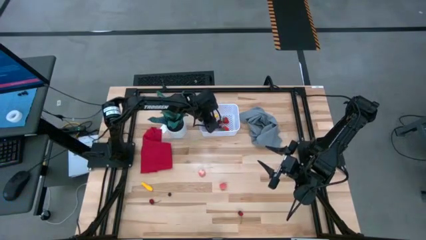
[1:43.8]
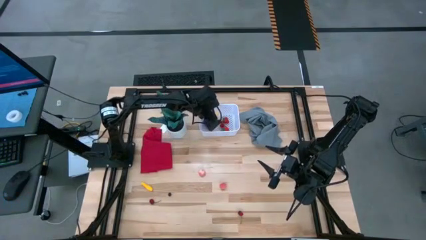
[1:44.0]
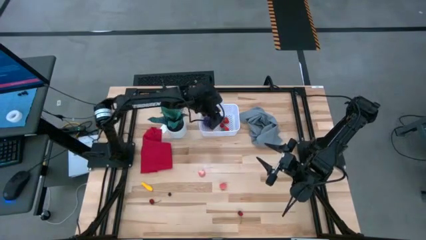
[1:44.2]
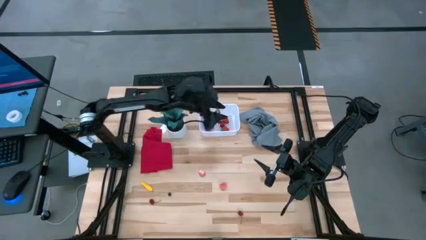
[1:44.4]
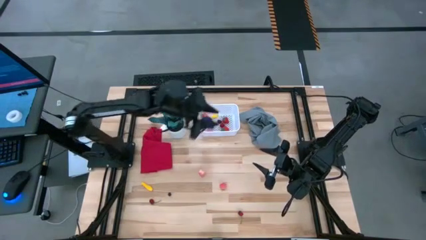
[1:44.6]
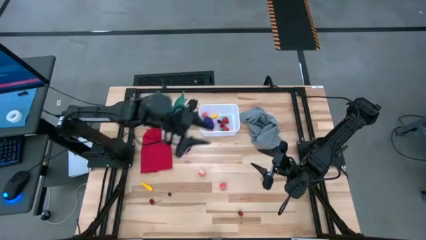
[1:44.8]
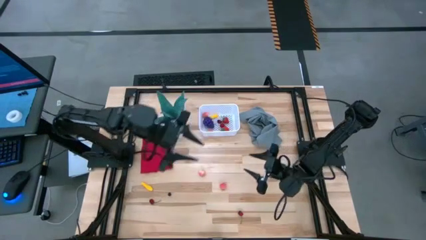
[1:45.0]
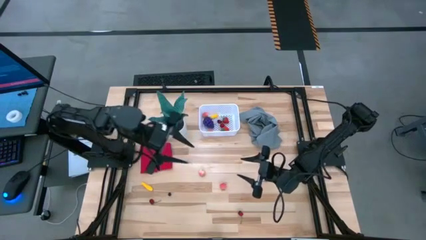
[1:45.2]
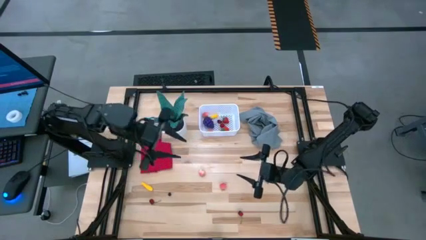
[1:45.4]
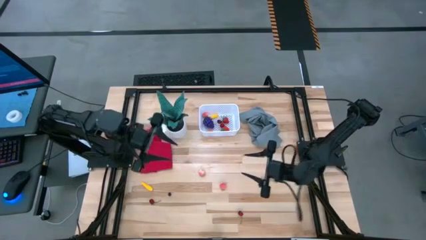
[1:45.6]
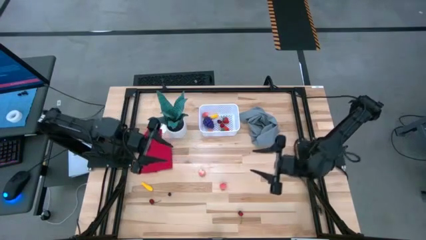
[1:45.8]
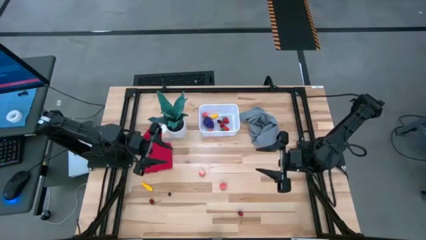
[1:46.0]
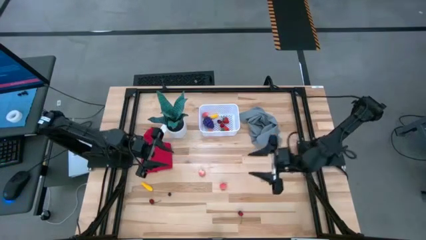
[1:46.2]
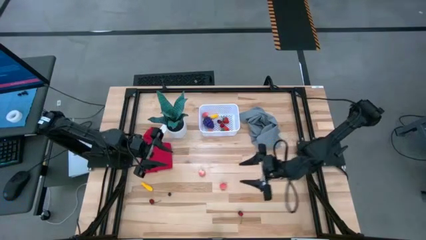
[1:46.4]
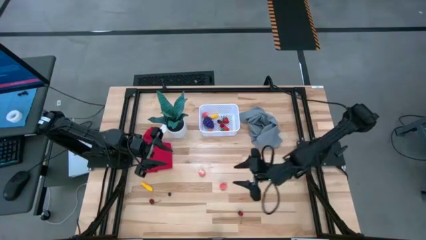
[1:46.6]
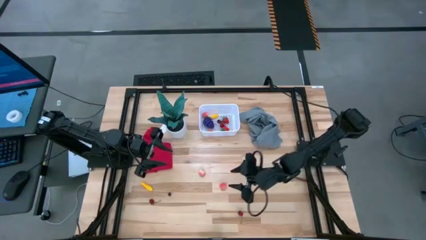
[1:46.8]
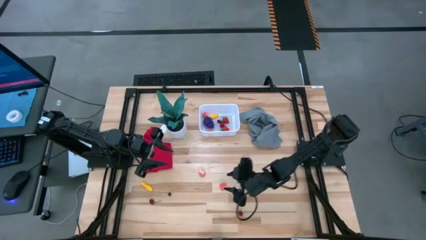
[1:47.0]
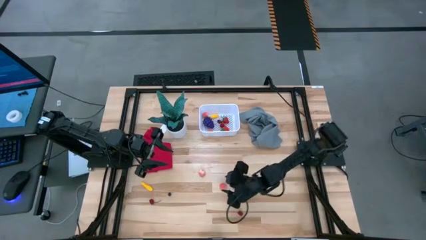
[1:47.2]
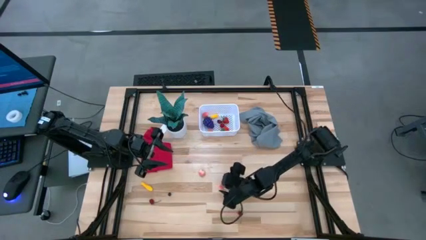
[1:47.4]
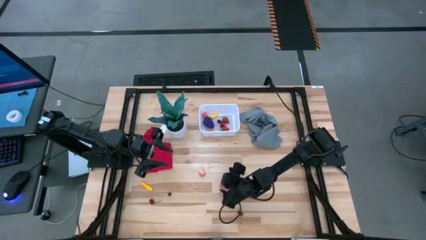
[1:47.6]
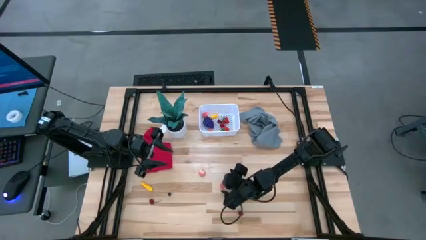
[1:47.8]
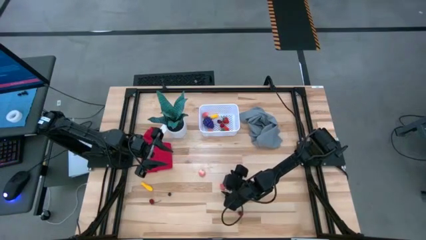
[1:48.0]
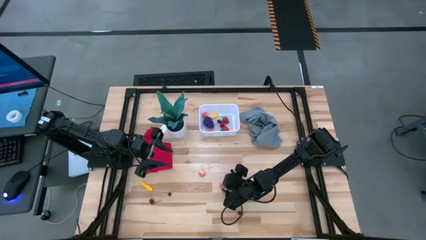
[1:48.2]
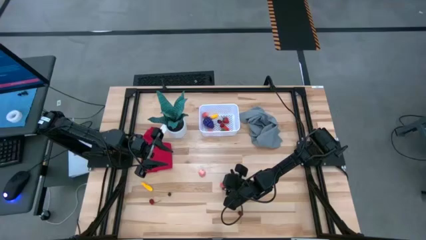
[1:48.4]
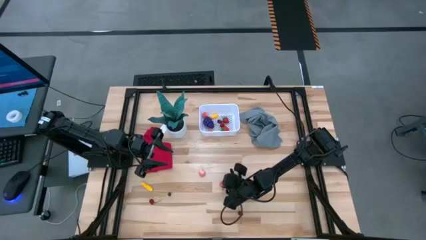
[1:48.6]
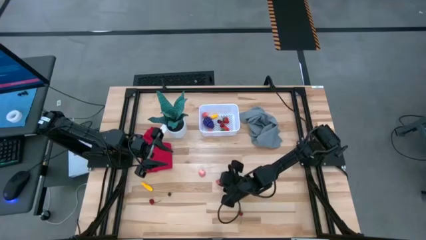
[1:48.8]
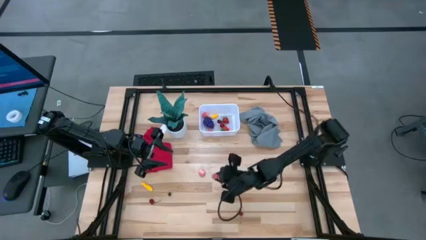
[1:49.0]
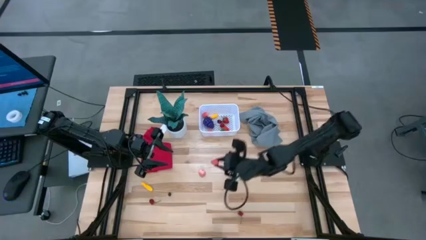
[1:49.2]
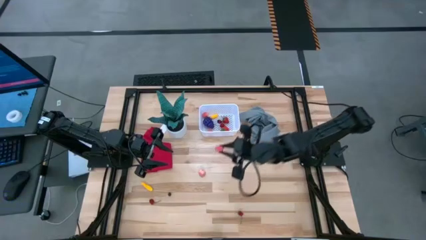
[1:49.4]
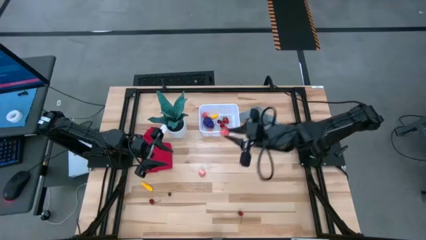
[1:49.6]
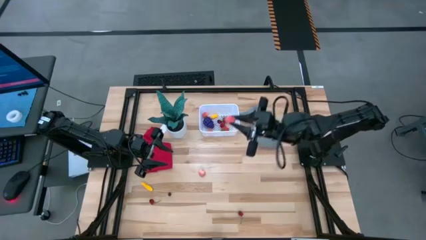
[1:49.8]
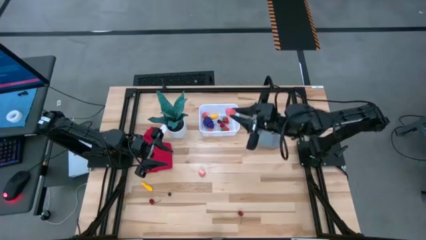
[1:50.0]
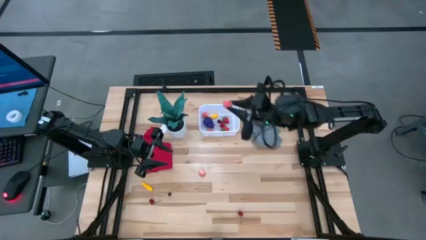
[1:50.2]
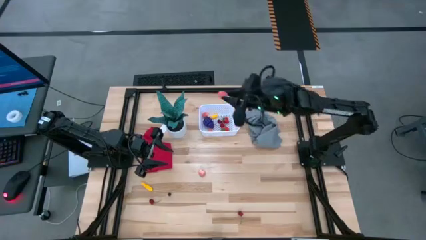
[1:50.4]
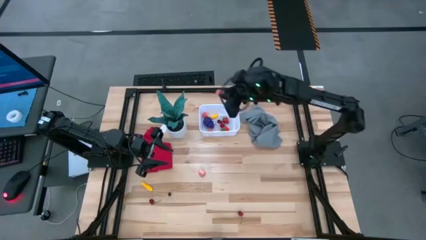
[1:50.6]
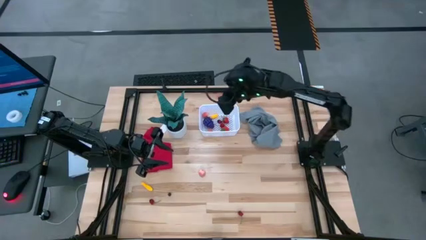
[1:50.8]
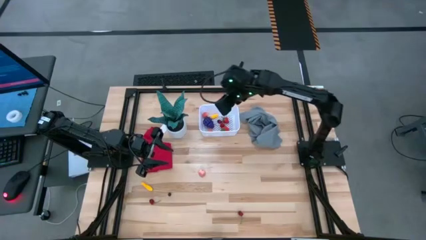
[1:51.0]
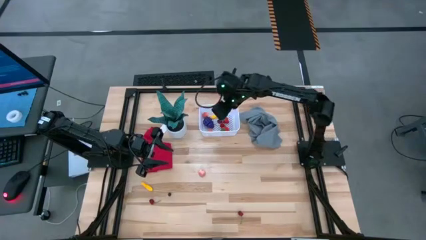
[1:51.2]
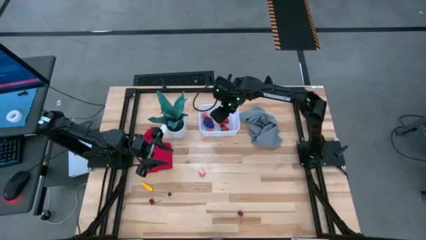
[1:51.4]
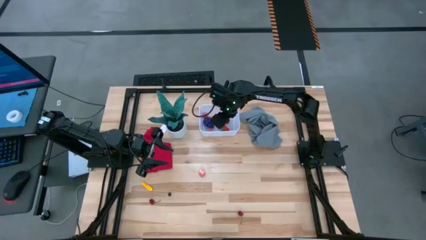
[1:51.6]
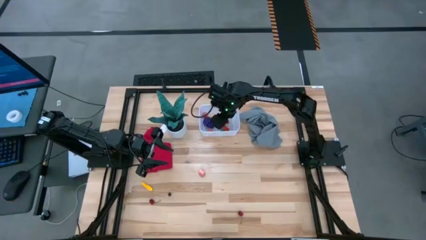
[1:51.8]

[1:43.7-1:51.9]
Task: Pick and placing Produce into tupperware
Put the pink peach into the white bin

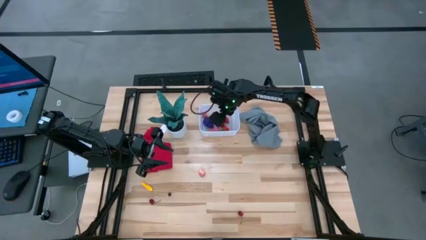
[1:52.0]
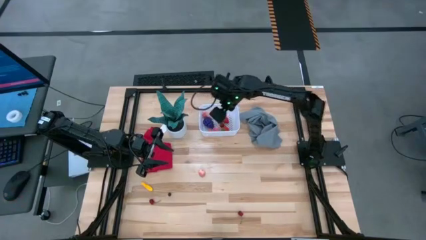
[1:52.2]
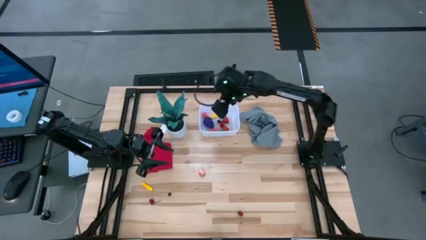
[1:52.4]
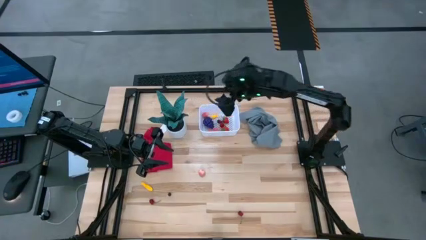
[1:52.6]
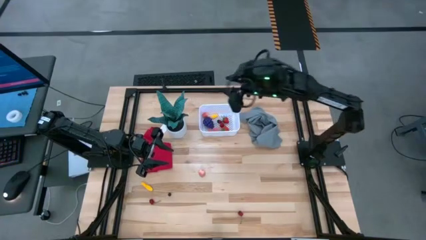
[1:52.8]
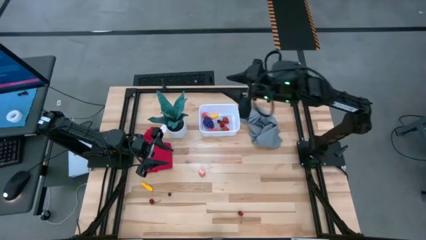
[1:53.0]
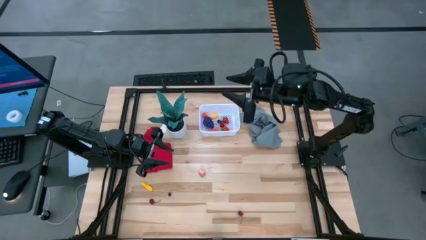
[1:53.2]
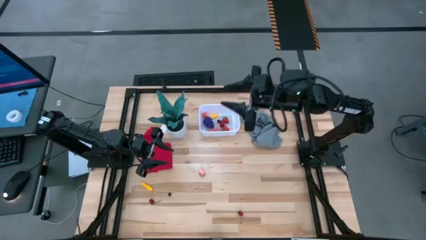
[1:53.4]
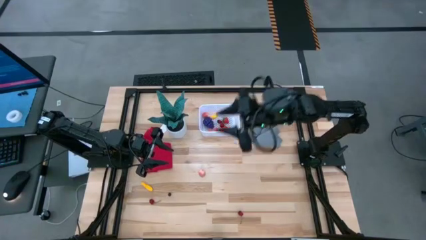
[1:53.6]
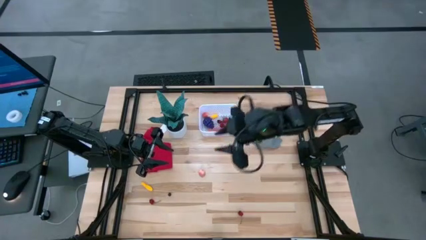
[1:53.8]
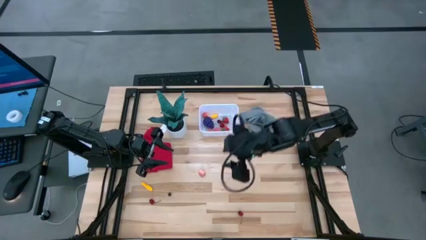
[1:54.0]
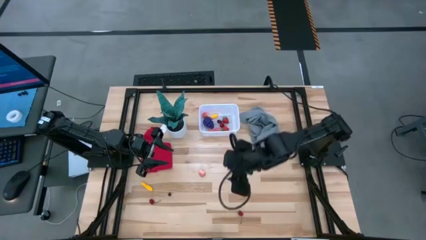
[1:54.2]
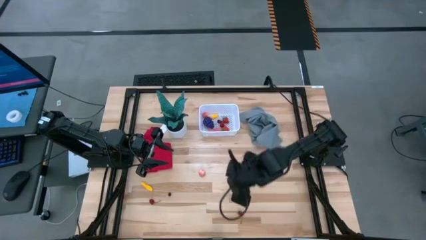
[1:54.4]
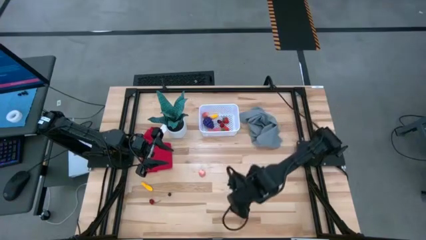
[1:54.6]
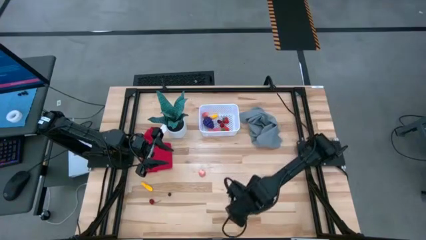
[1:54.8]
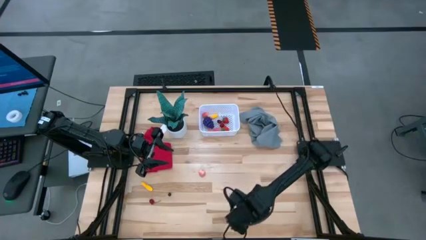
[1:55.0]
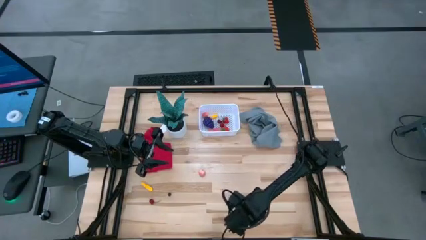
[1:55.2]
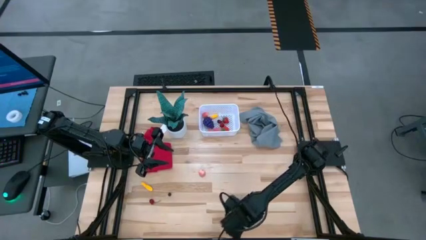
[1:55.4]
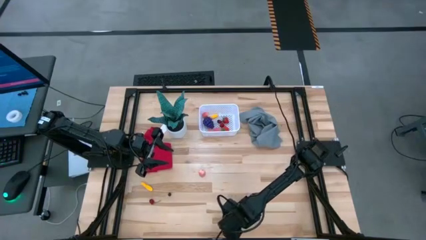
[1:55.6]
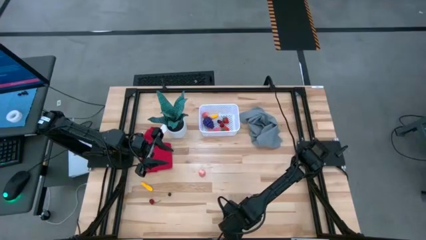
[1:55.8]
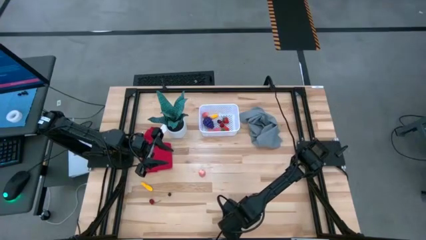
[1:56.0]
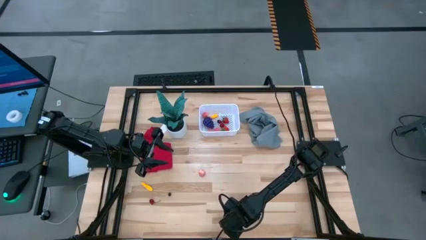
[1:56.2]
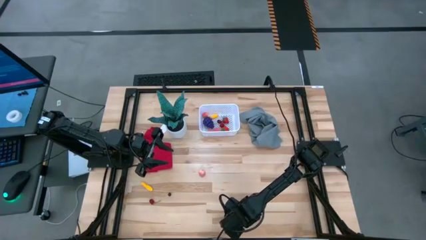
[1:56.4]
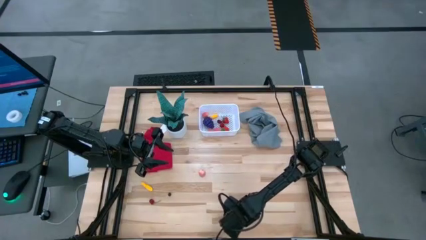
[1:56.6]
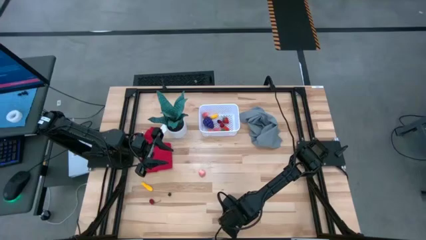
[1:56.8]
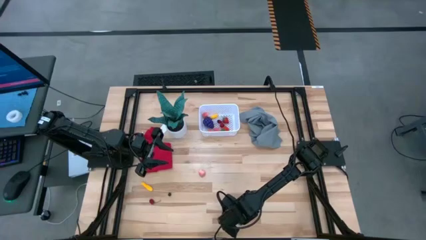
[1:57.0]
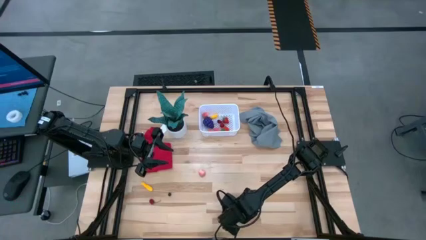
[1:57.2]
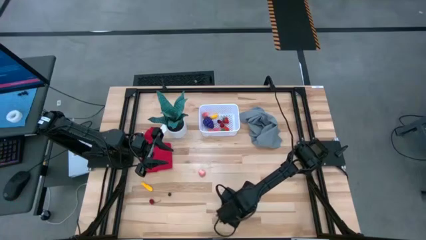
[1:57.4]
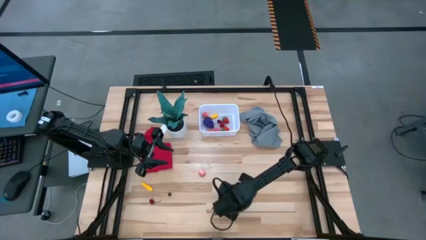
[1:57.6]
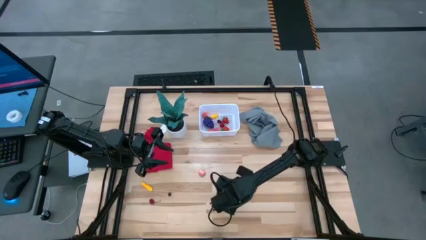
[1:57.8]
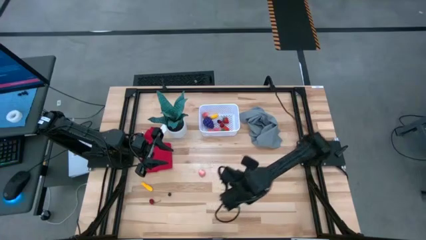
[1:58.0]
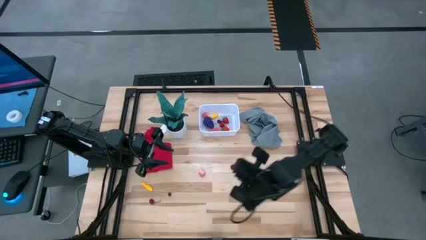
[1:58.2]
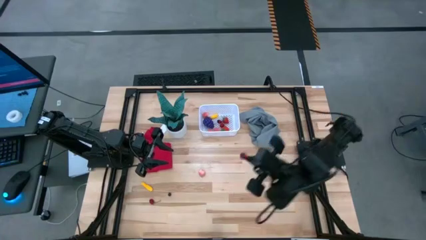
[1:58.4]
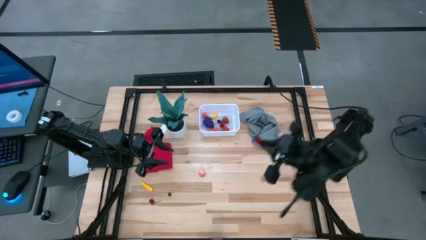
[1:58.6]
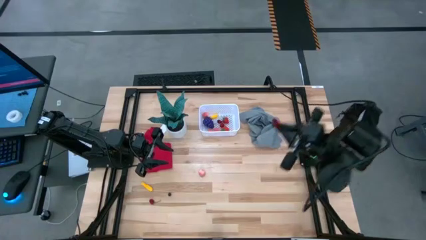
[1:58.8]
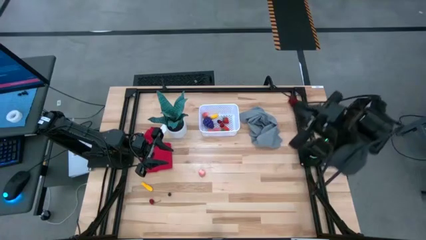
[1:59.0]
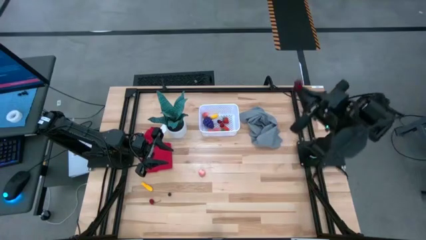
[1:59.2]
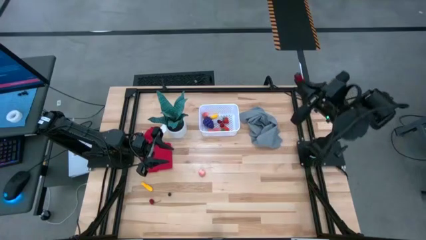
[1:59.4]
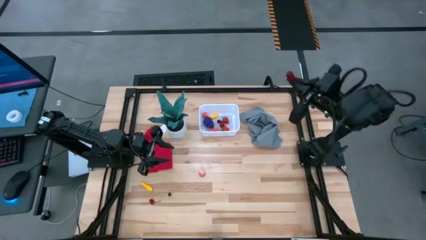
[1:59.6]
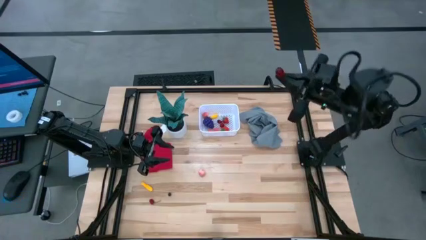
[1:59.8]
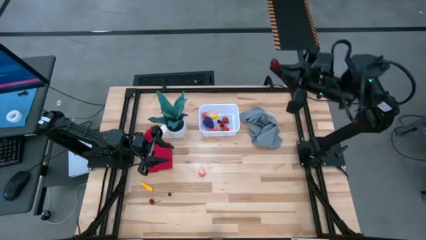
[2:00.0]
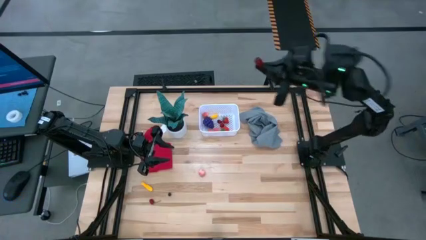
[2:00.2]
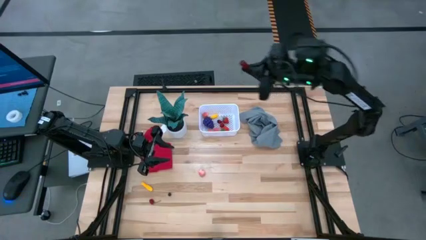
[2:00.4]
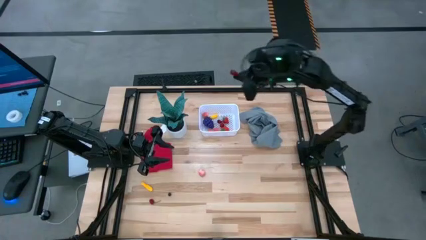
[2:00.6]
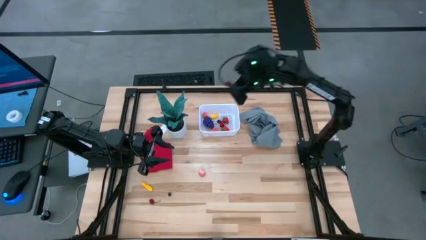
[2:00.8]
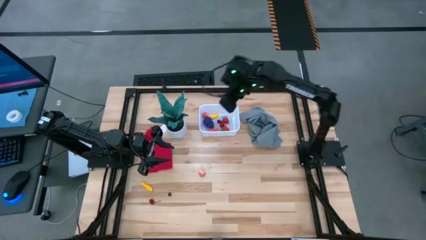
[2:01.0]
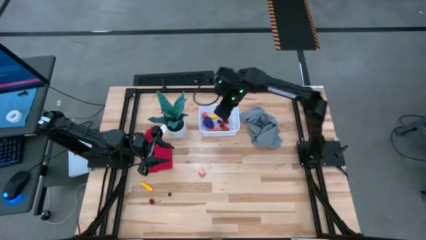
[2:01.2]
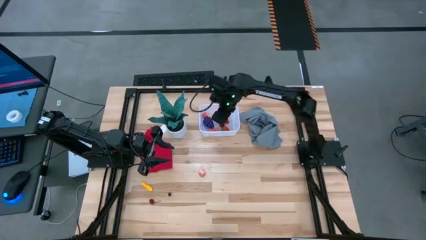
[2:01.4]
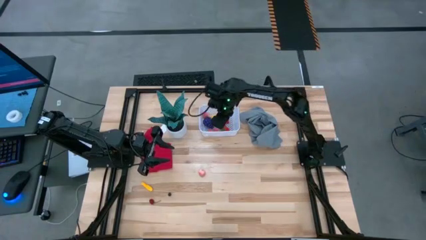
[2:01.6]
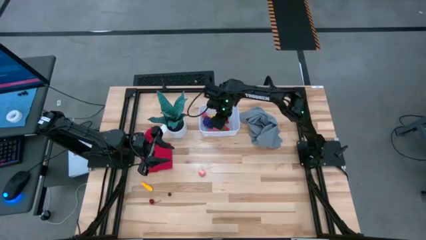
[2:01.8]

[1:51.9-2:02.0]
Put the red cherry into the white bin
